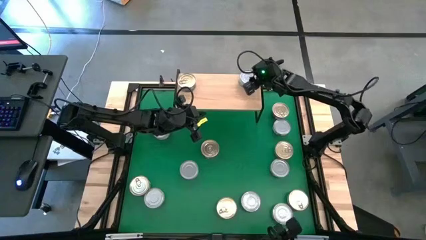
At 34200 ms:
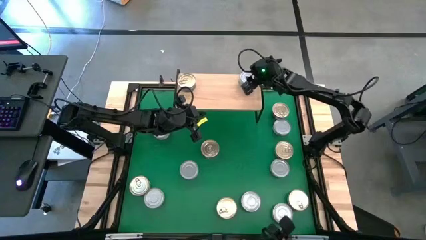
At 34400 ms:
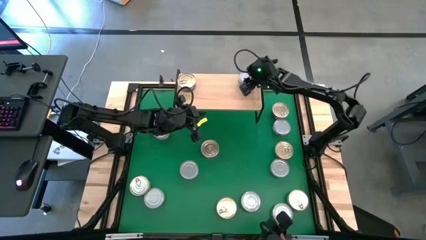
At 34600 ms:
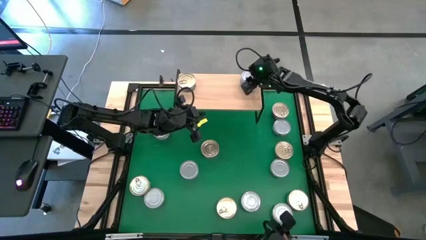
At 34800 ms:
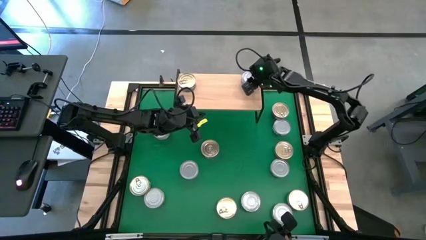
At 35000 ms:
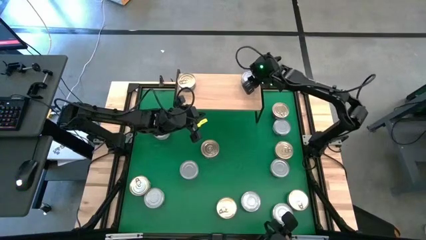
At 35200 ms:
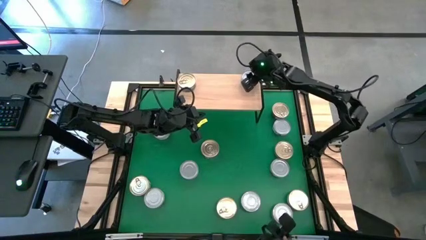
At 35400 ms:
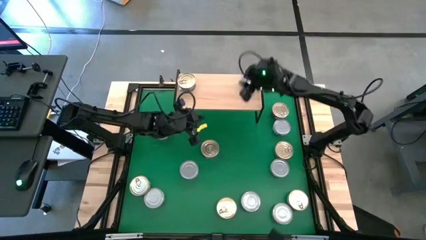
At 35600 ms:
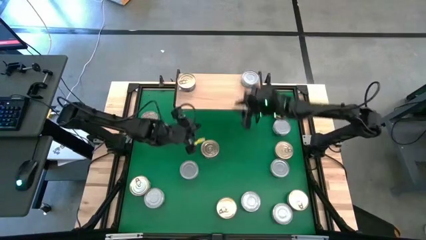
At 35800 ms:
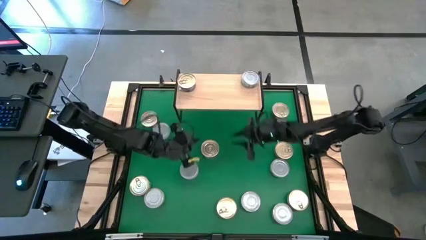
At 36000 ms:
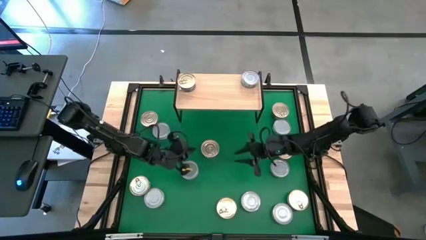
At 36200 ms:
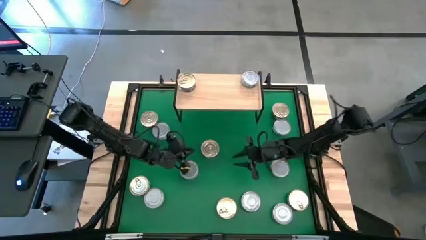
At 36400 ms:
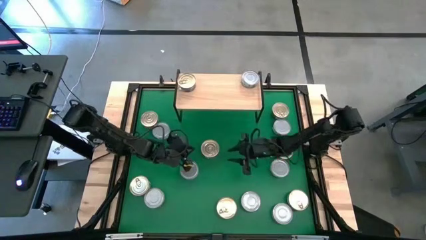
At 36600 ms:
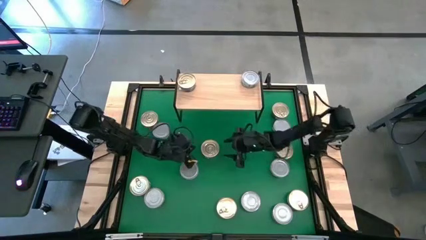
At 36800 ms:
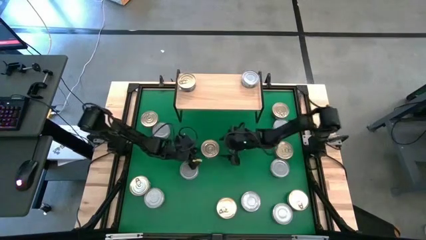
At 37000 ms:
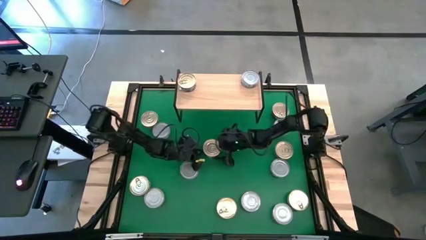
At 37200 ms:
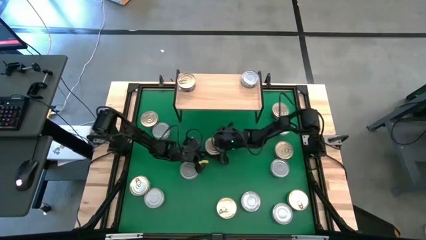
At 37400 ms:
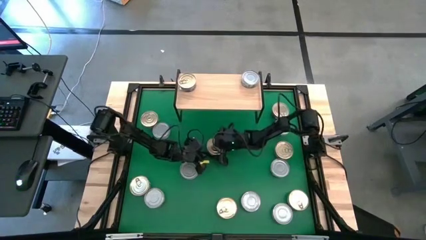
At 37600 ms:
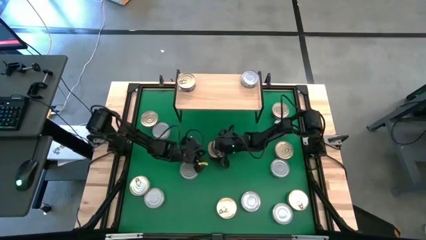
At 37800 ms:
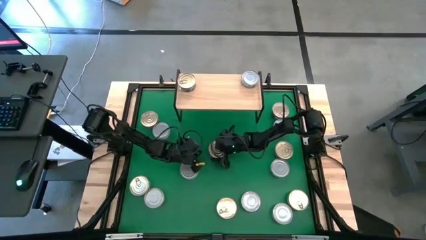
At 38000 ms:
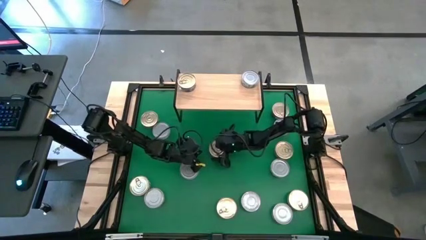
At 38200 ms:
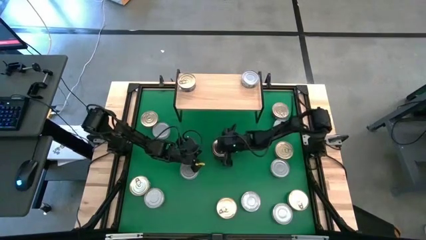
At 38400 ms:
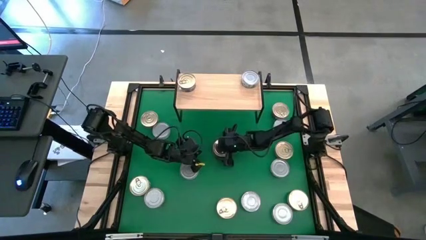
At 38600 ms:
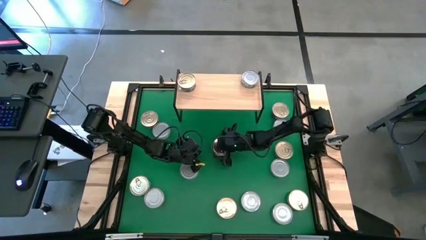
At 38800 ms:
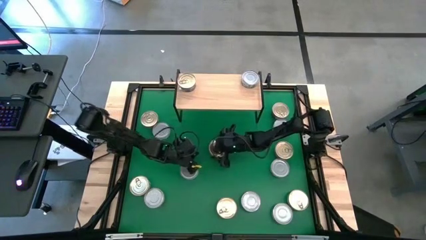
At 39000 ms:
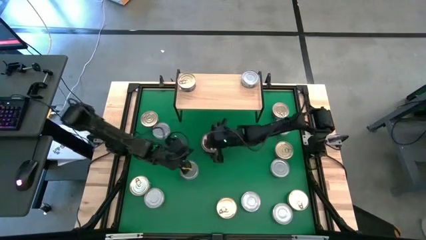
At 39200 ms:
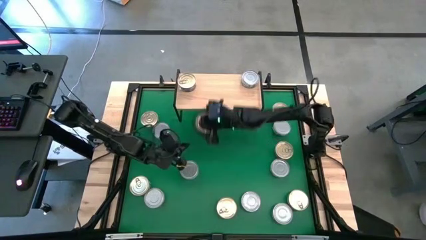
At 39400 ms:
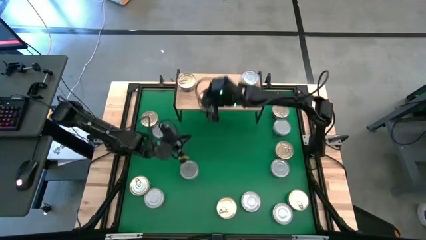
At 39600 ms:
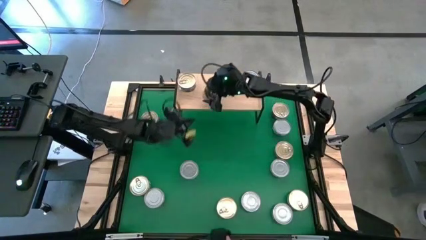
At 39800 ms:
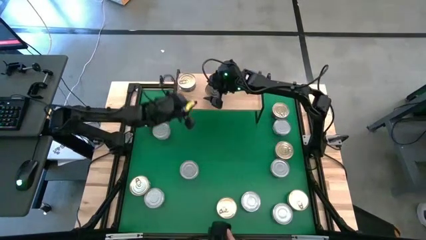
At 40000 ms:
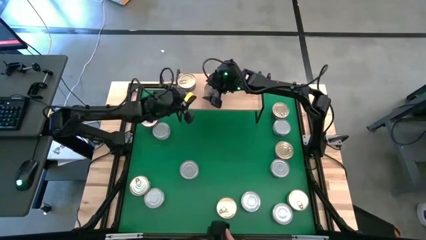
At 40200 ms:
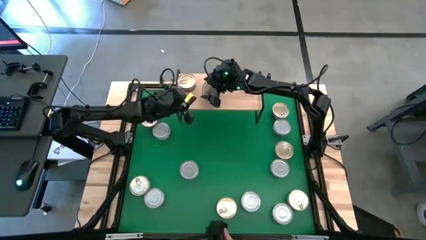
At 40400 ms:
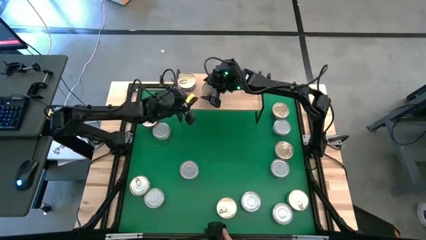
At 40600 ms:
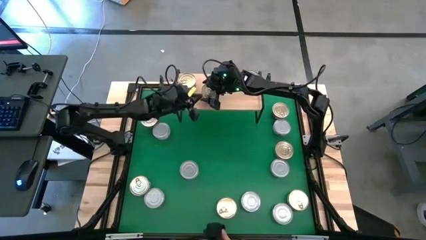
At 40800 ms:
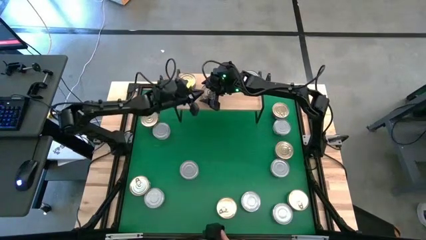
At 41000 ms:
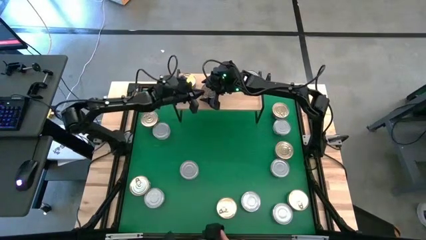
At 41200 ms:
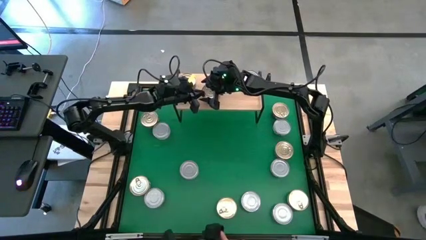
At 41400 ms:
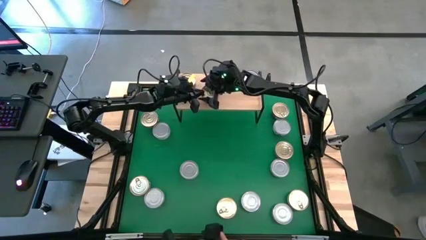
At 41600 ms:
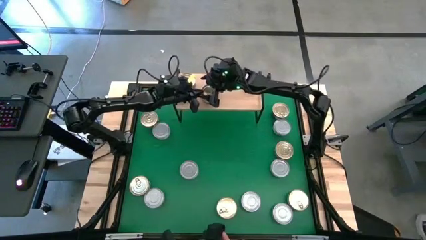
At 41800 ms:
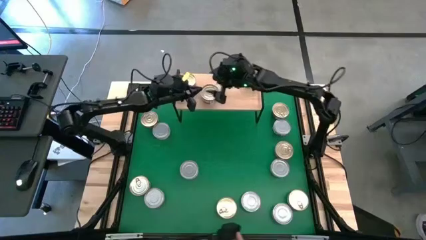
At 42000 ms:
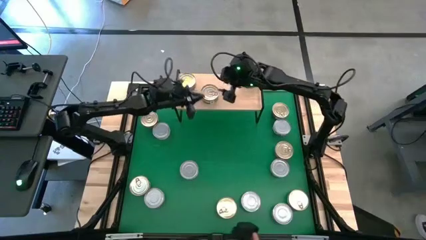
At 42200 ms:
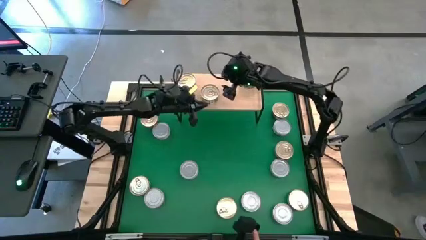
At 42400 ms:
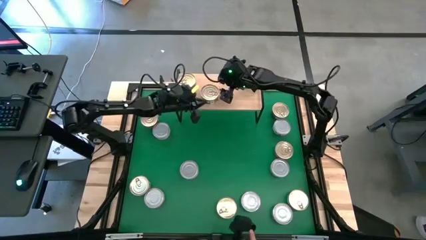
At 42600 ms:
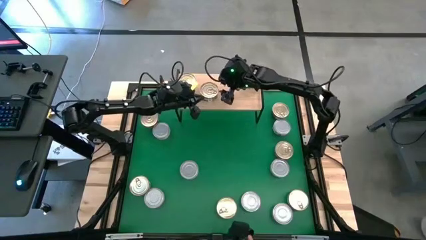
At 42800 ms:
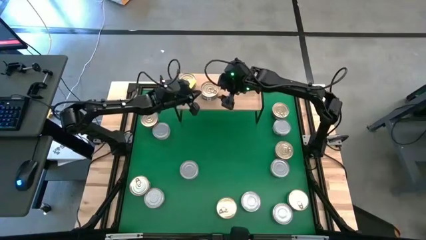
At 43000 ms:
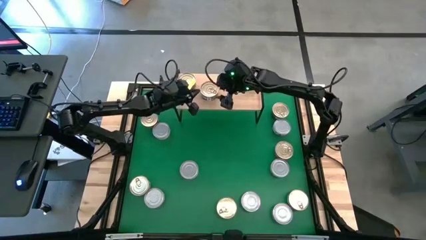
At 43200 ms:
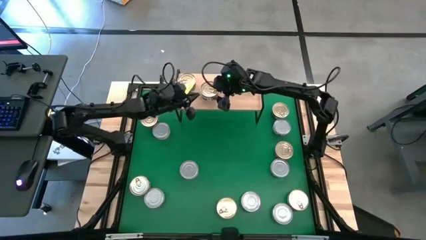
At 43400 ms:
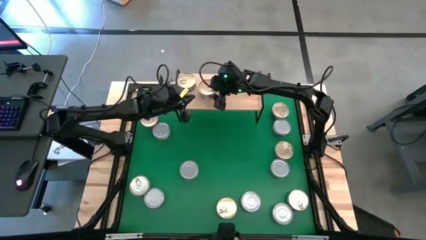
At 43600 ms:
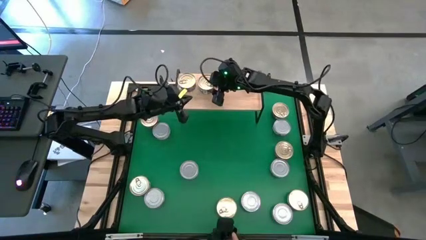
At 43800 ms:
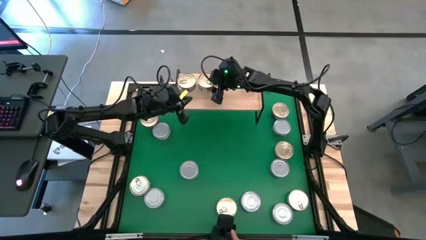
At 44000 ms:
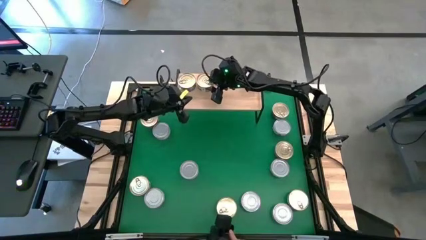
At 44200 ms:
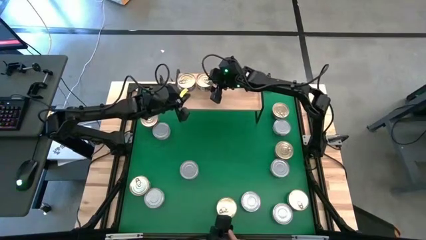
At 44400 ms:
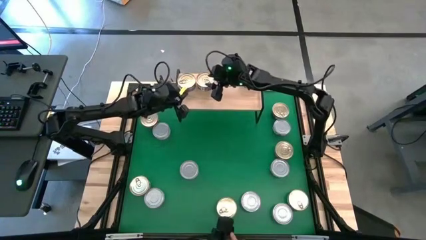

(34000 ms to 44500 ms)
Task: Stack canned seafood by type on shelf
Put the blue tuna can on the shelf aligned with the other blue tuna can

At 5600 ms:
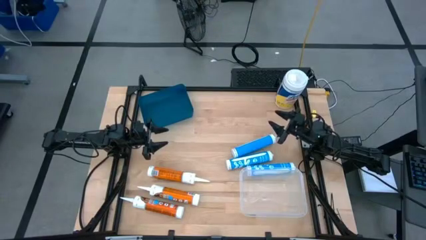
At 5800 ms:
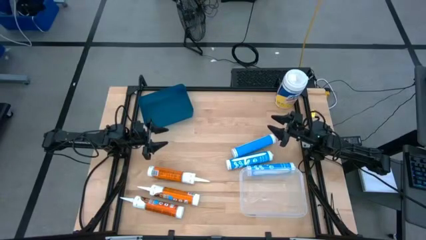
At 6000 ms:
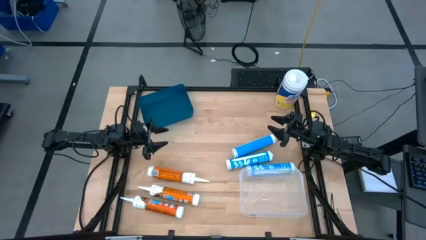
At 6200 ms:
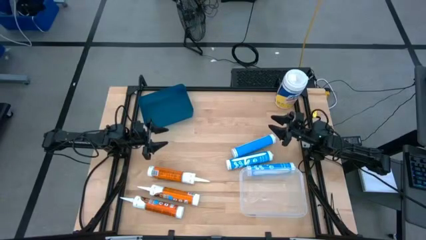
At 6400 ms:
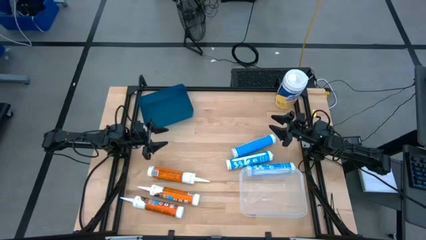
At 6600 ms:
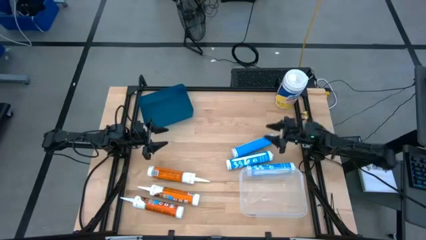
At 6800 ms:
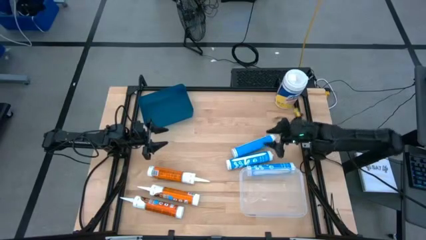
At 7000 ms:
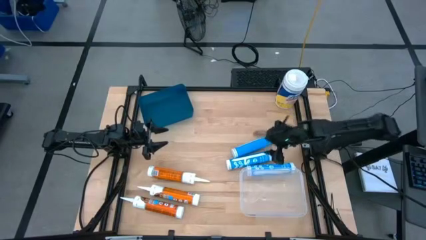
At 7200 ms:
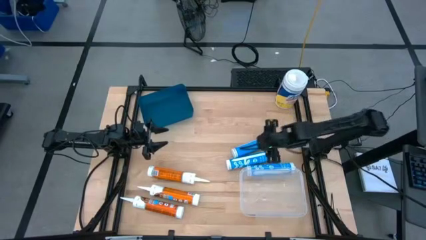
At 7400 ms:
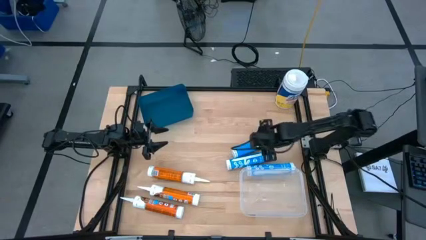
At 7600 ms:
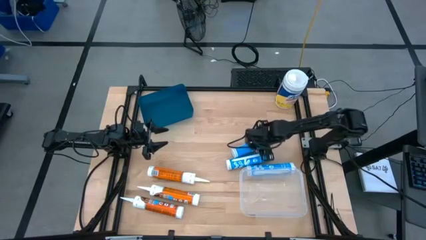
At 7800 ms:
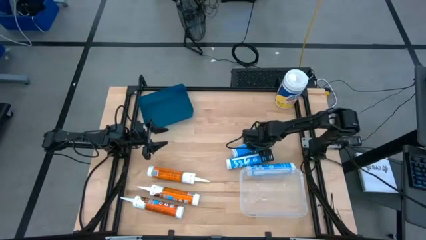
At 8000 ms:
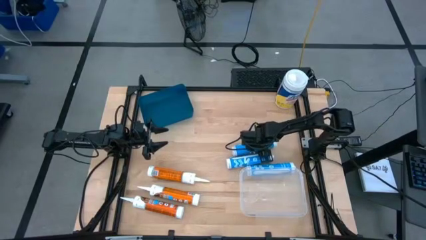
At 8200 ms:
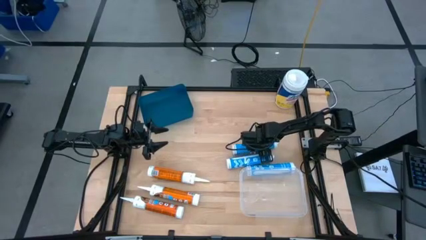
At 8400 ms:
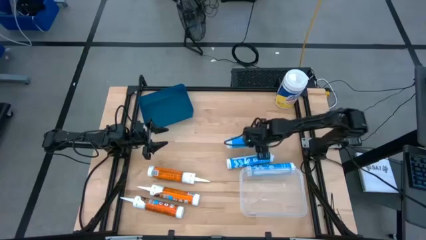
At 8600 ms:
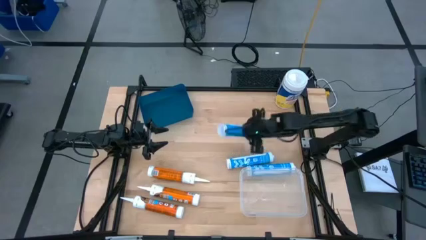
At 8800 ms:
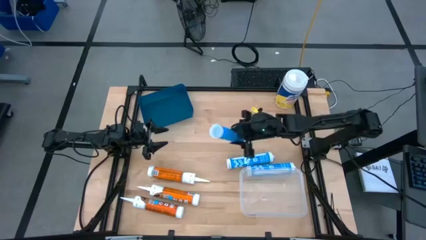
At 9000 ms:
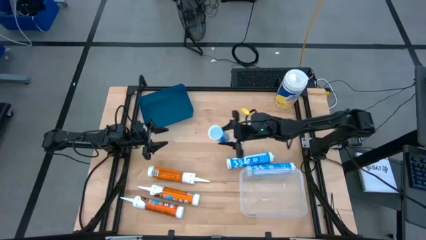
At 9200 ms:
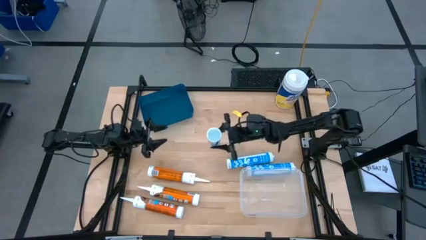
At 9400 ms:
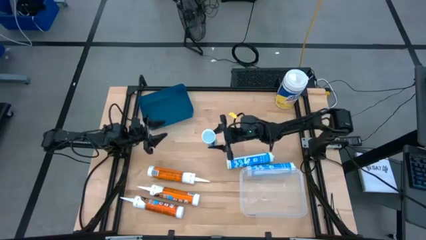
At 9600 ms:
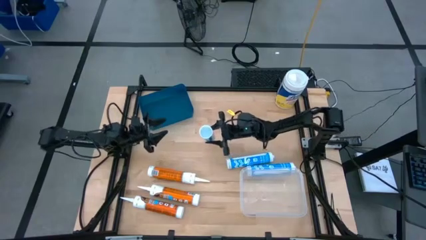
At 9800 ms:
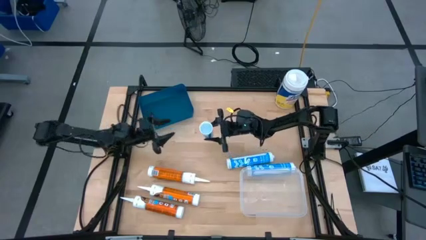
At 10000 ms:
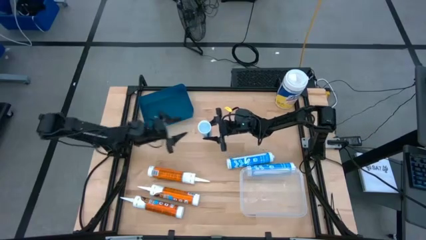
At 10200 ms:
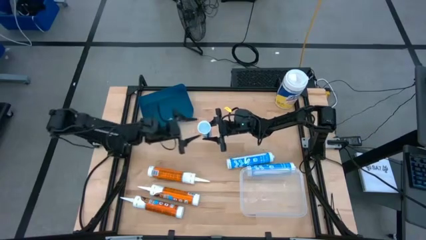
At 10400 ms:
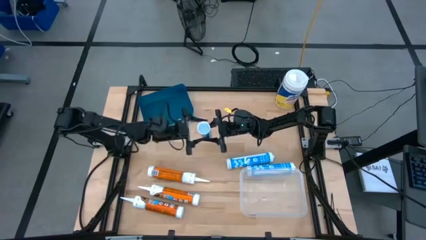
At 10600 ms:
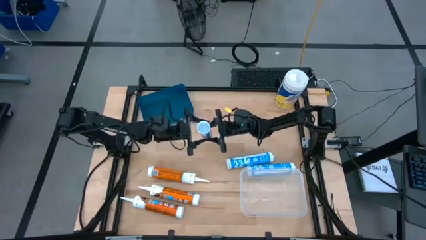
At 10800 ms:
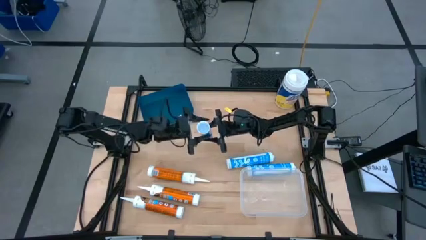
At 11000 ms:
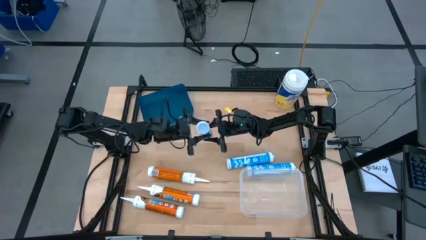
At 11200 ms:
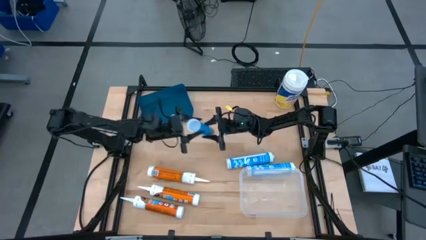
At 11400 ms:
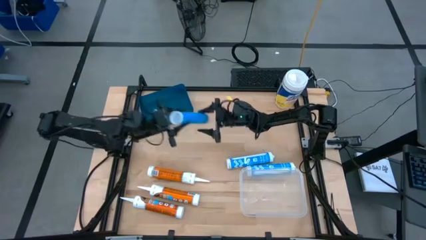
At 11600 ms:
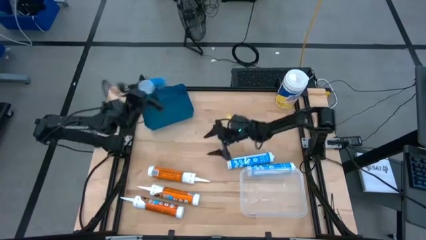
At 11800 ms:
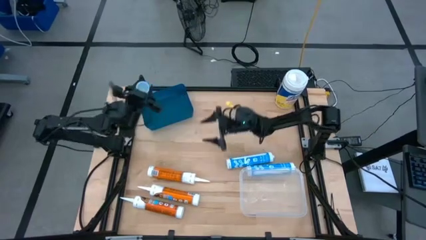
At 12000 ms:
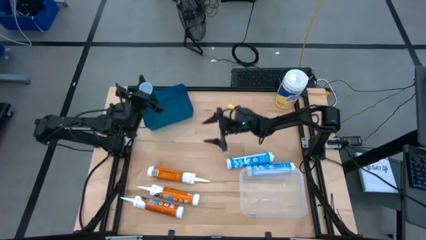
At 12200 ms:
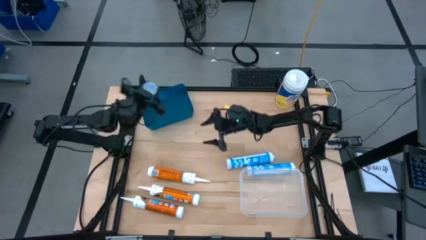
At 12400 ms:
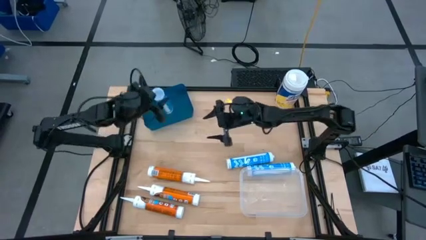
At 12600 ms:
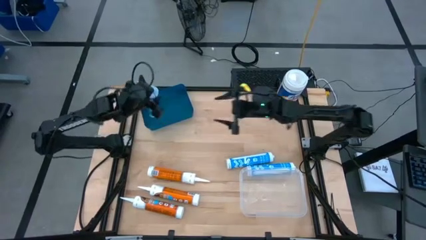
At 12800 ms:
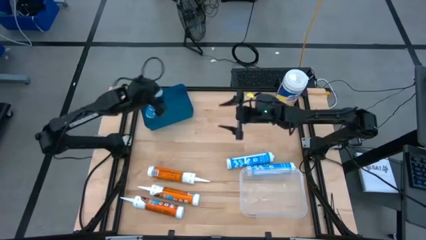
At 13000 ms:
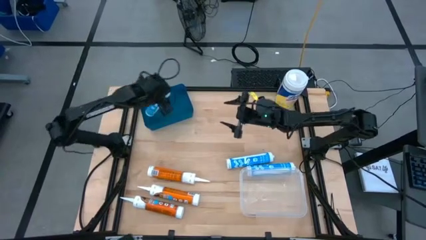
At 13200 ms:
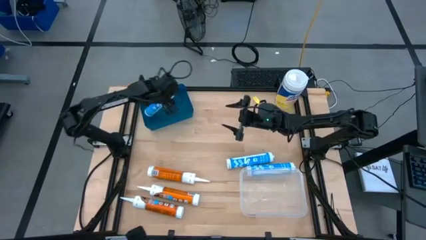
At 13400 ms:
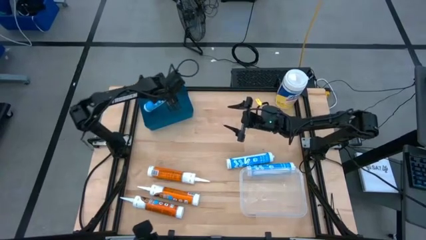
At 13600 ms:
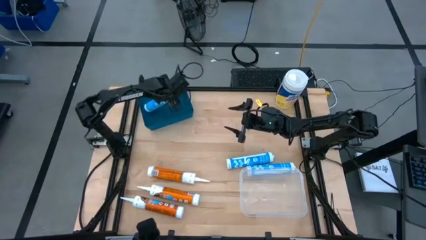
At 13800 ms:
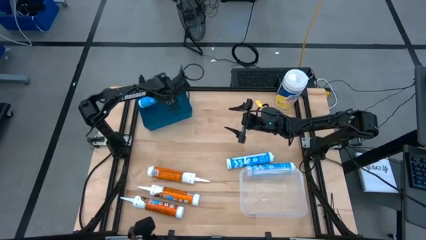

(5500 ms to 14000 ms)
Task: Pick & place silicon tubes, Sealant and Lysol wipes
Put the top blue sealant into the blue bin
